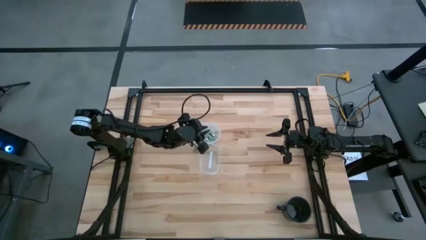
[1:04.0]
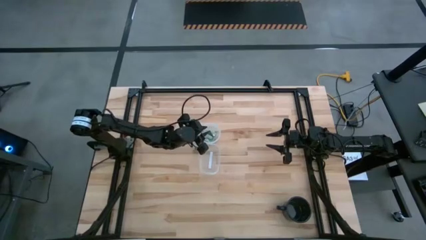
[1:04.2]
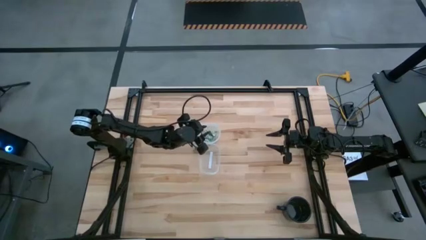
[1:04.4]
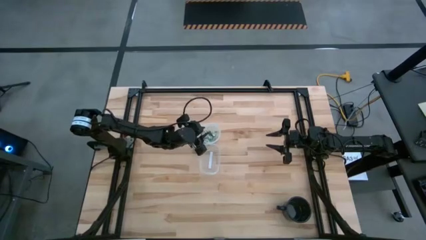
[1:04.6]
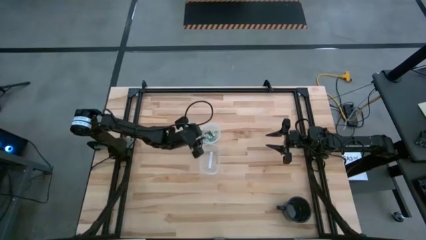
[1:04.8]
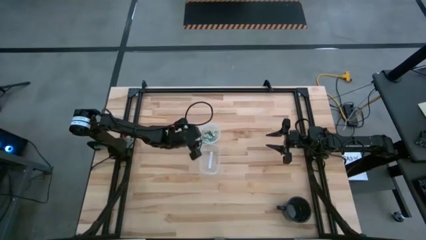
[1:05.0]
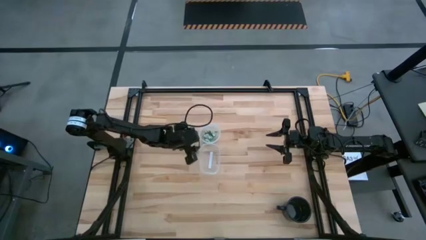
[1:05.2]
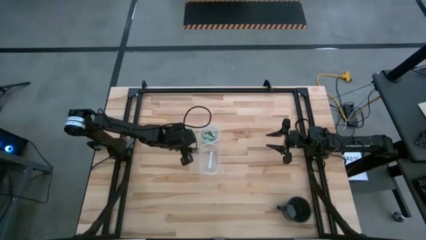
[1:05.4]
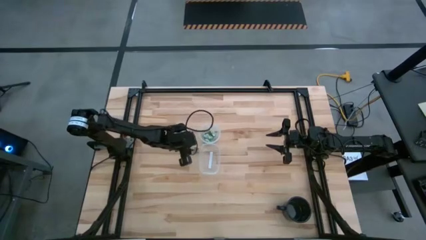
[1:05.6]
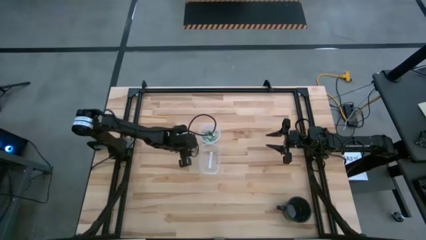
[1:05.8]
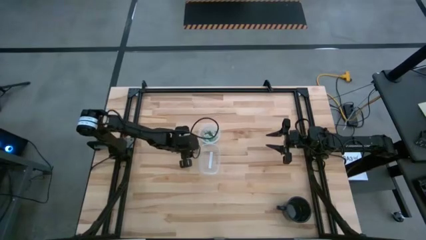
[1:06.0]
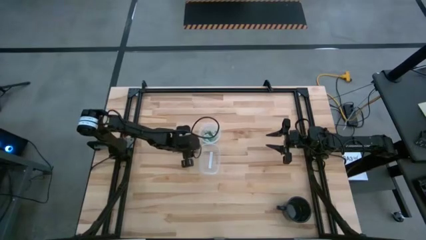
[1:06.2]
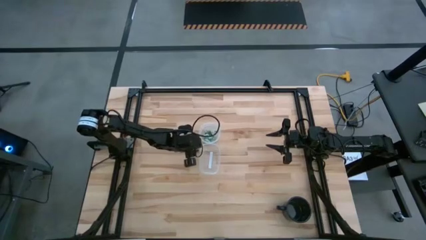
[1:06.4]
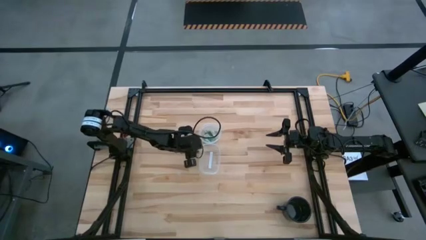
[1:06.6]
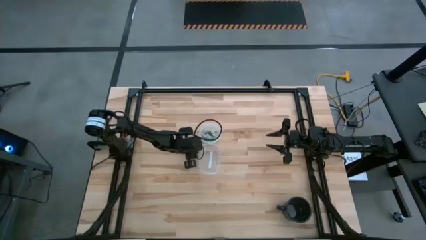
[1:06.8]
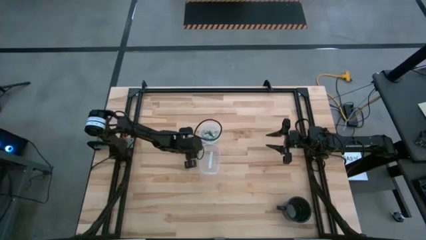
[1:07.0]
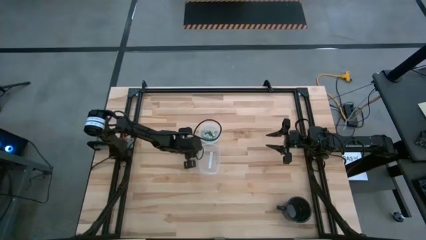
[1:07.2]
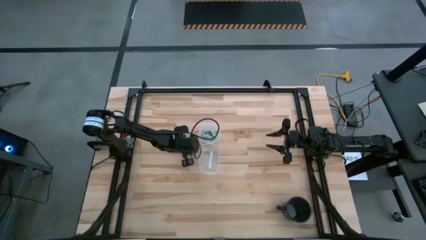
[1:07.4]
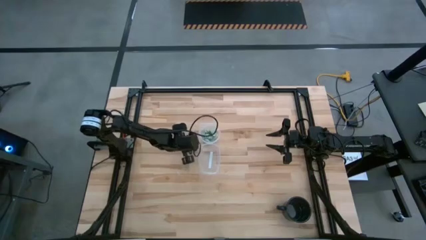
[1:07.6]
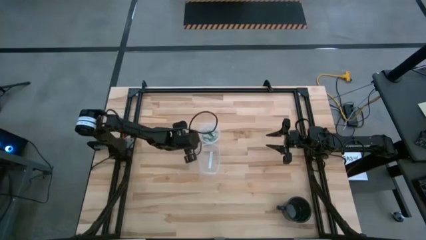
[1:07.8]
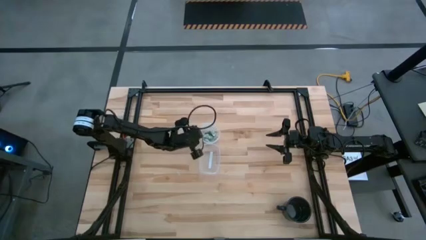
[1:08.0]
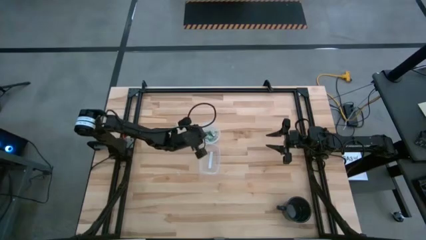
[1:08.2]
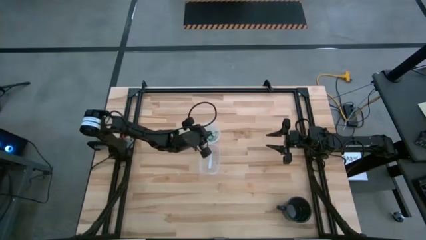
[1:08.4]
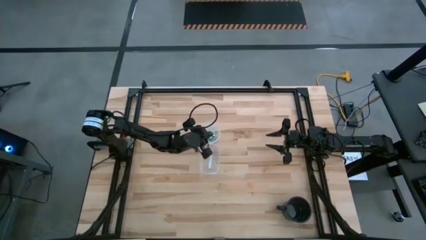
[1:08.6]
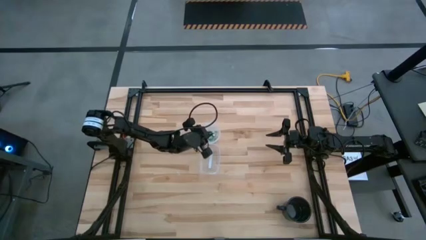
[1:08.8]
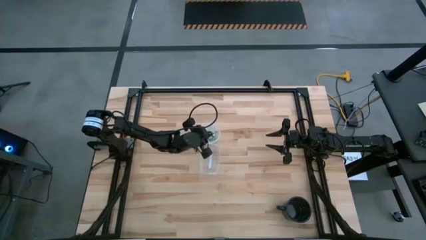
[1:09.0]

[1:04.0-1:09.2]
Task: Pick and place items into bin
Put the stevia packet into the circular transparent bin

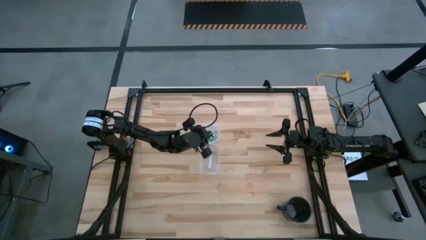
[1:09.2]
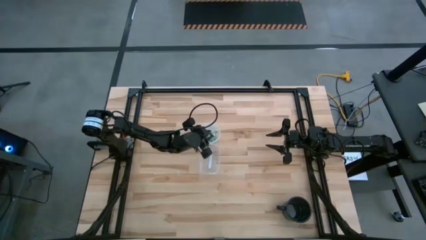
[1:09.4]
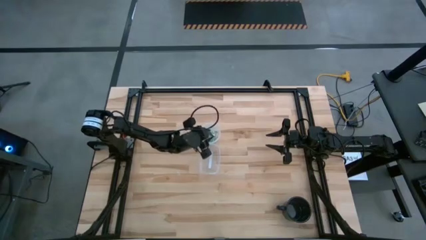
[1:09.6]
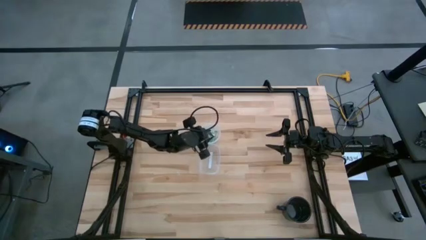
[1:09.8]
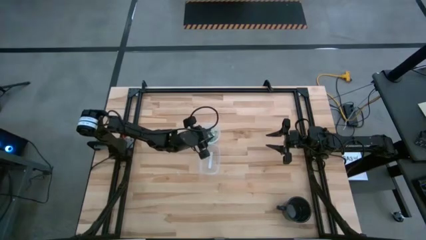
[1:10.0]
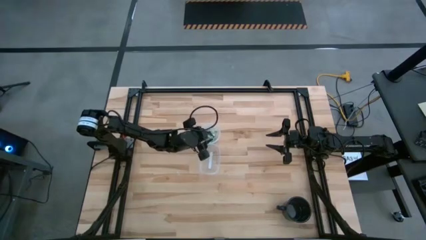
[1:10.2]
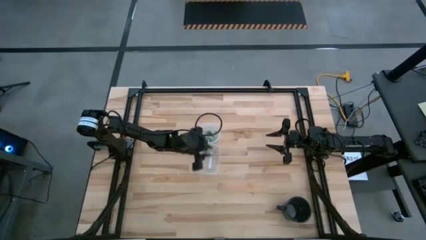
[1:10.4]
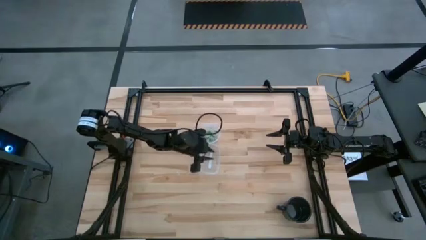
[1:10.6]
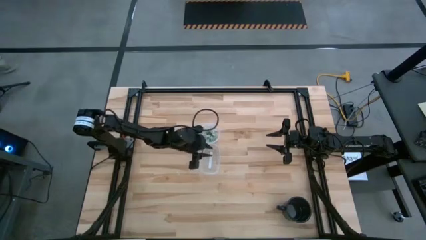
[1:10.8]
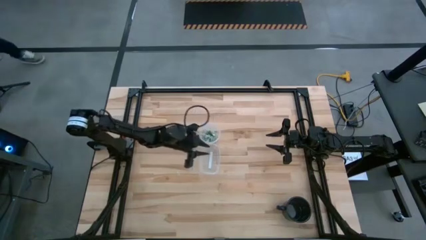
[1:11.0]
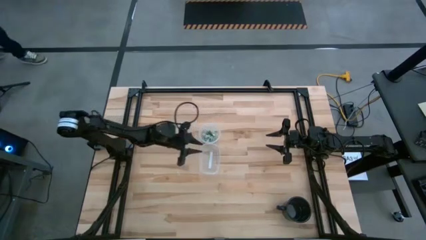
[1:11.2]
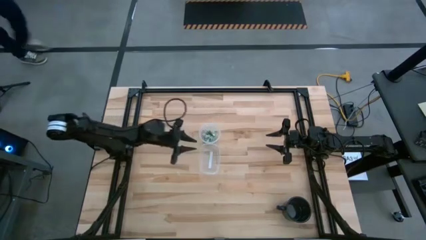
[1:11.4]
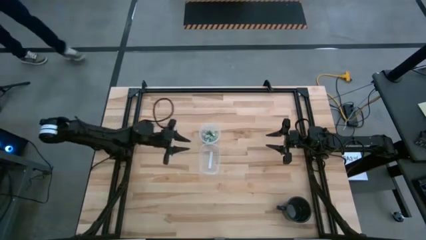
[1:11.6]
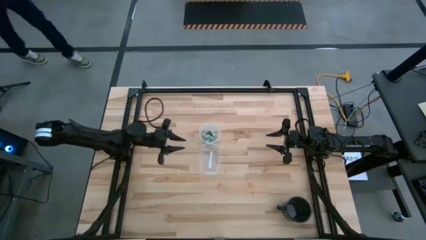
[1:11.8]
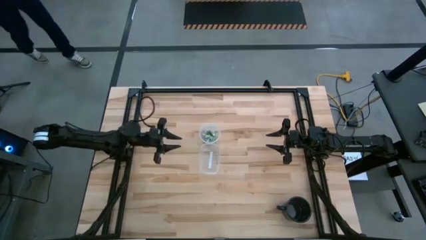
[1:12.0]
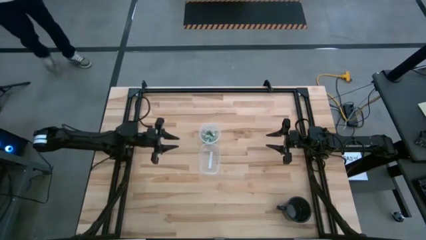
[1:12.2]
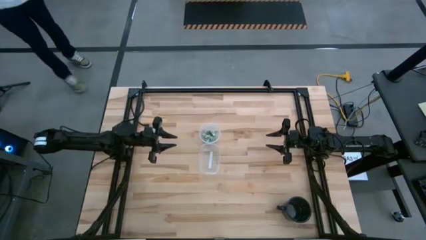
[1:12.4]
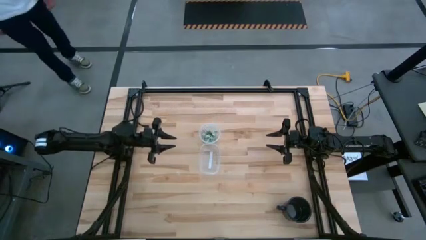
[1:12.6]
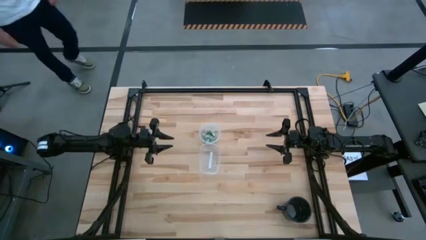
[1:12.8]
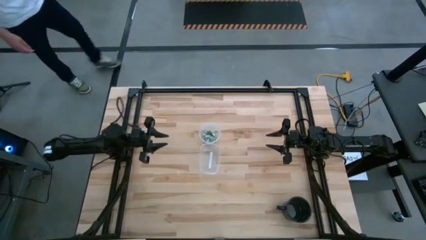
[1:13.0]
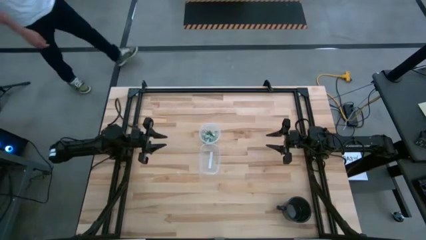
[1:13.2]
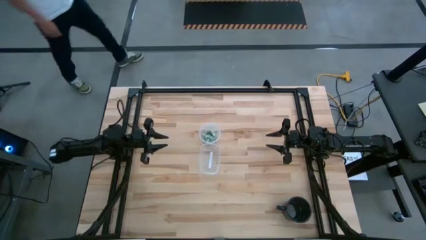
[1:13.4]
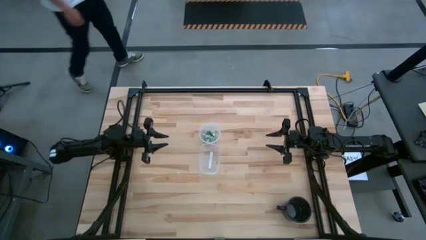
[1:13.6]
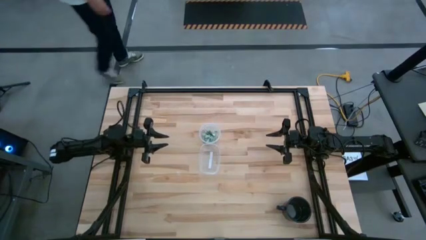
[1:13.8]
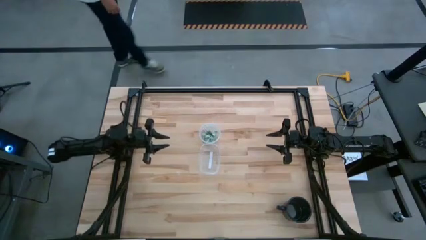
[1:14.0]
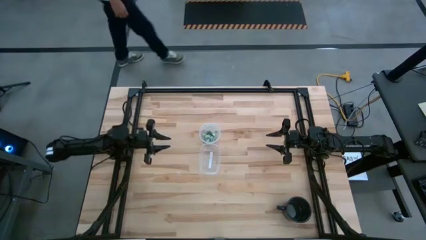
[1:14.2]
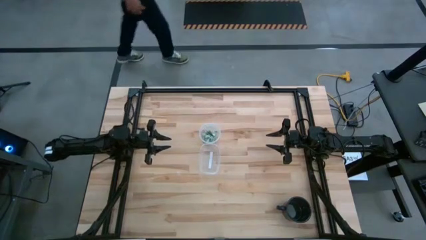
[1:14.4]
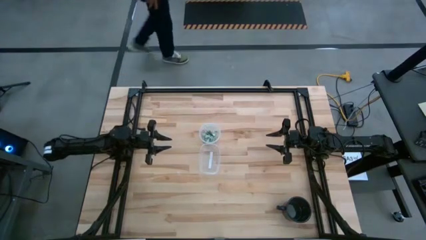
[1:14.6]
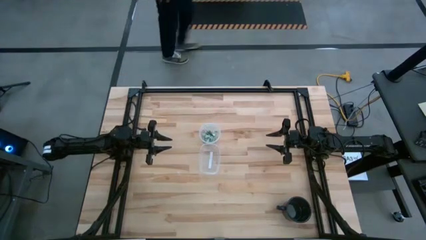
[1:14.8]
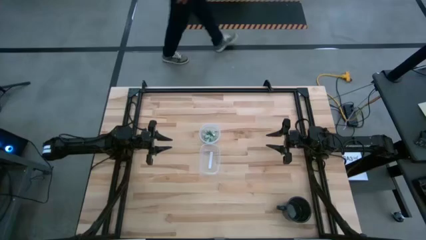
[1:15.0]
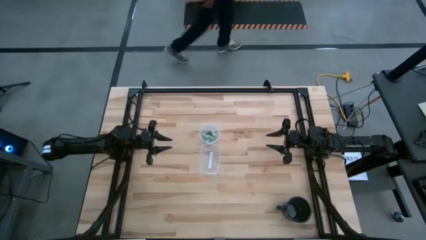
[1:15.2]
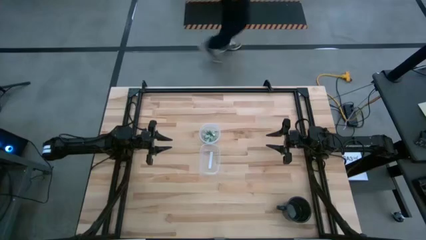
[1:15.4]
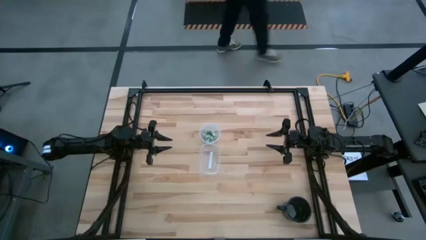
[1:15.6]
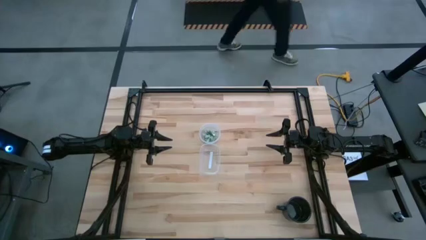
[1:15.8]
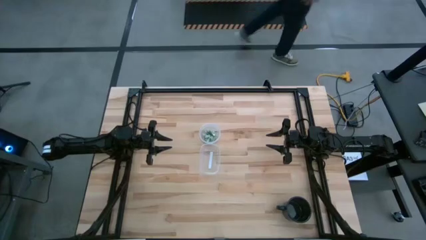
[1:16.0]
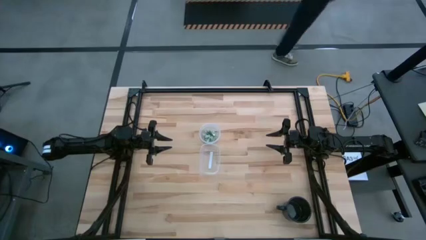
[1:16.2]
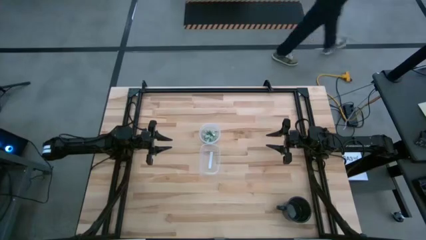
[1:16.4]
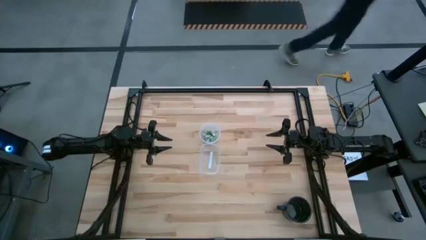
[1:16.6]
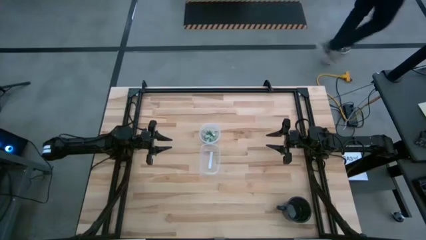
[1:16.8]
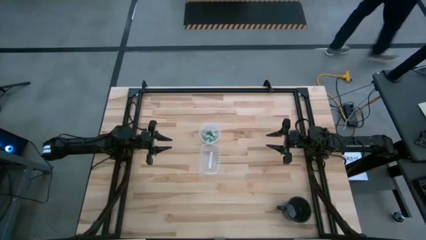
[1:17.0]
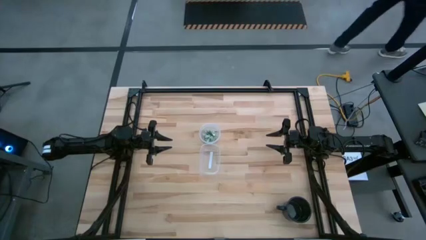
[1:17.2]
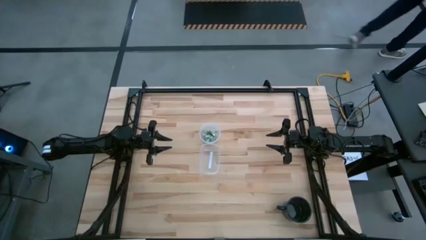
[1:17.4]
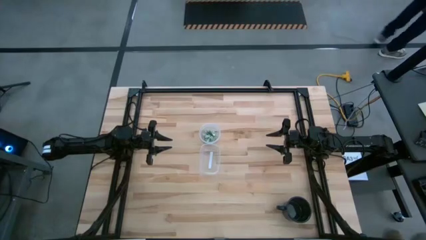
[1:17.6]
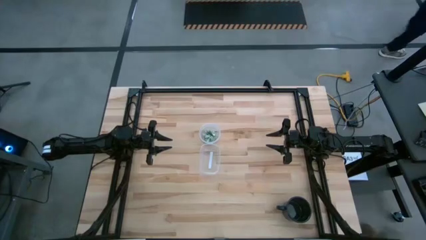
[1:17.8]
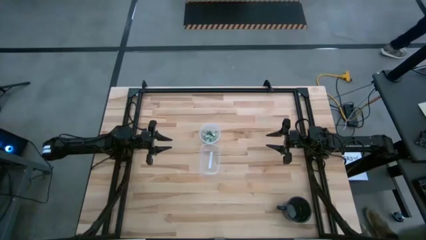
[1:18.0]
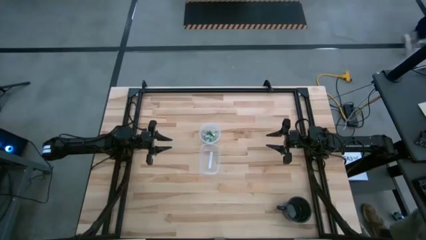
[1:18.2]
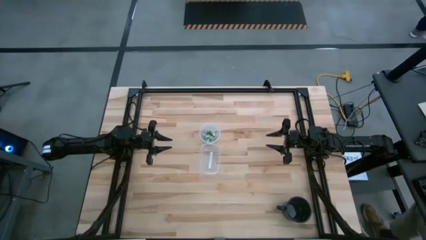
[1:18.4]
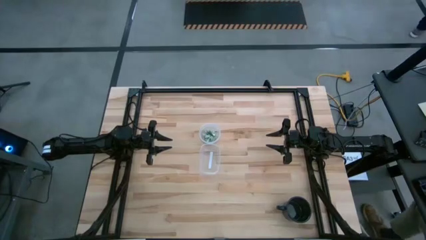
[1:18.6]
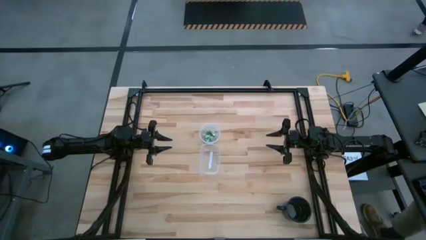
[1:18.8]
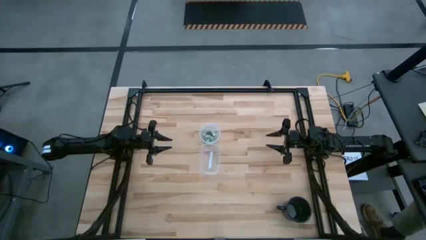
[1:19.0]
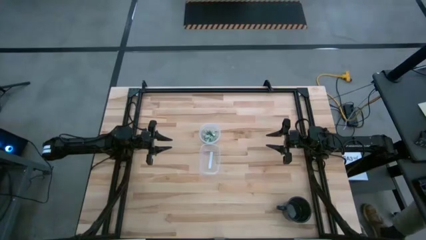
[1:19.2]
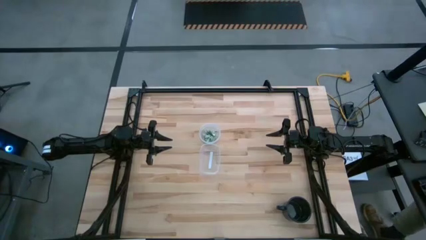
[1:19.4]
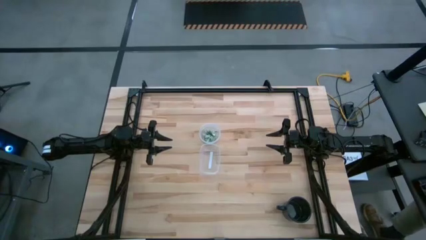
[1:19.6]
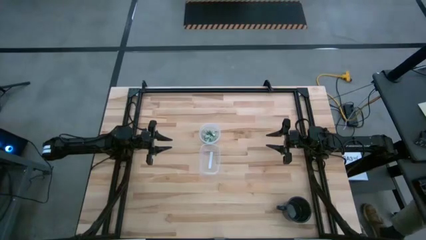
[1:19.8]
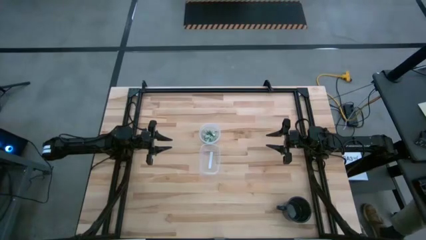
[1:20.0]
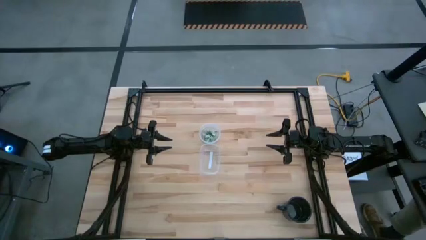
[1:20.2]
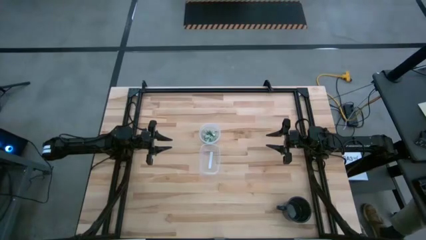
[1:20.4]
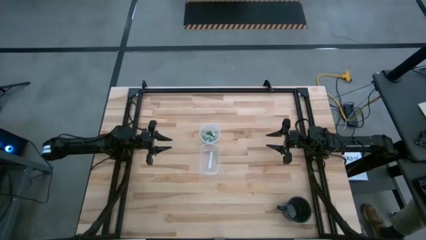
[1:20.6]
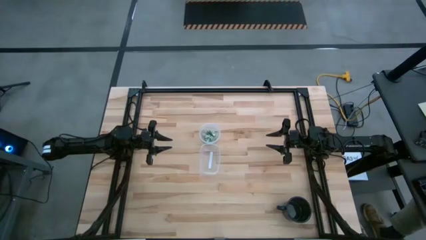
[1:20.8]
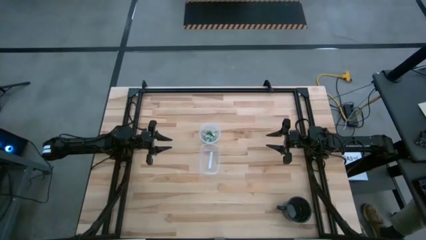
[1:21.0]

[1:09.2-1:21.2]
Return to Home Position
